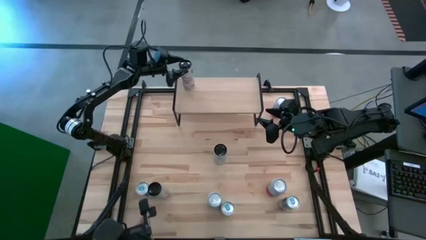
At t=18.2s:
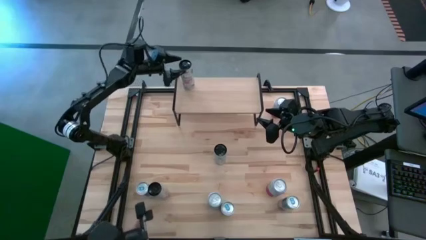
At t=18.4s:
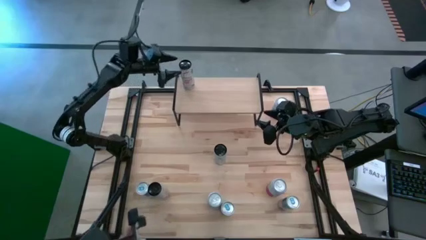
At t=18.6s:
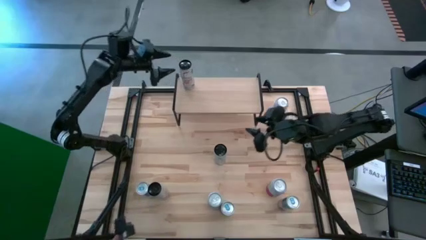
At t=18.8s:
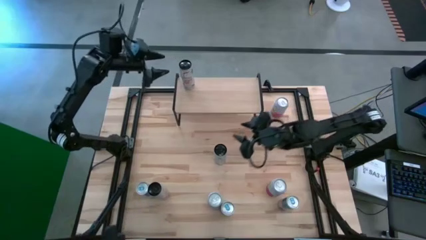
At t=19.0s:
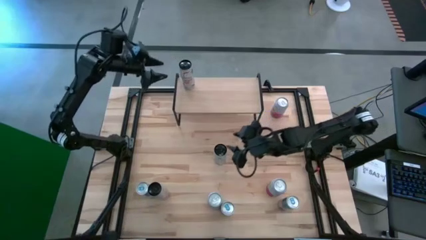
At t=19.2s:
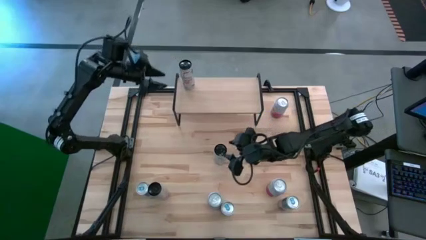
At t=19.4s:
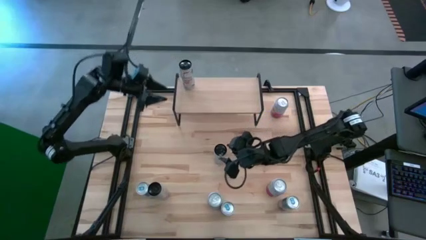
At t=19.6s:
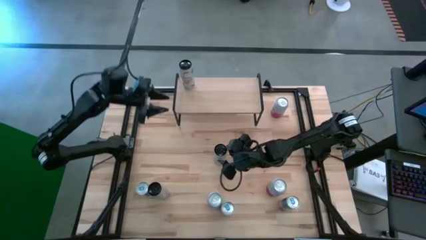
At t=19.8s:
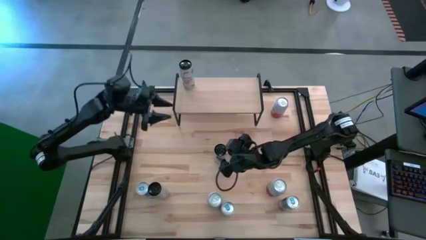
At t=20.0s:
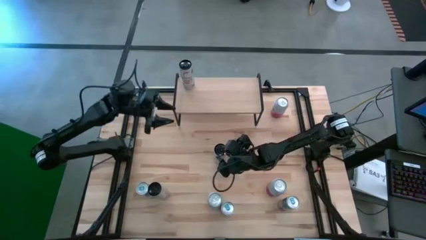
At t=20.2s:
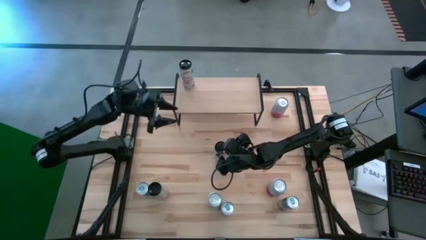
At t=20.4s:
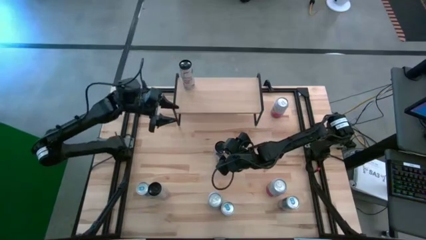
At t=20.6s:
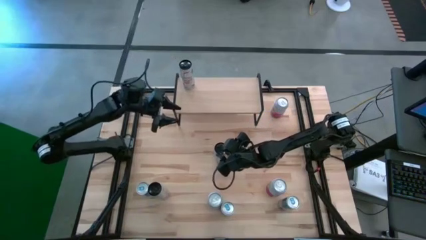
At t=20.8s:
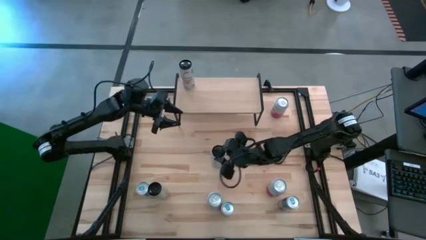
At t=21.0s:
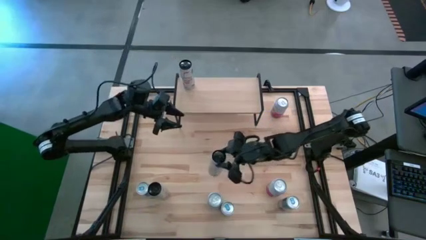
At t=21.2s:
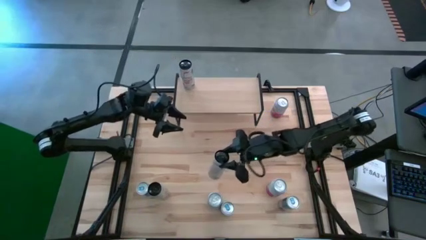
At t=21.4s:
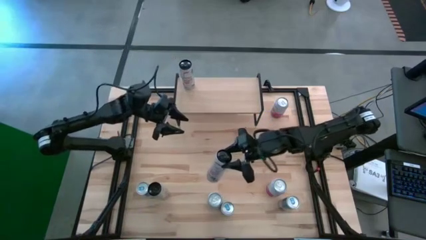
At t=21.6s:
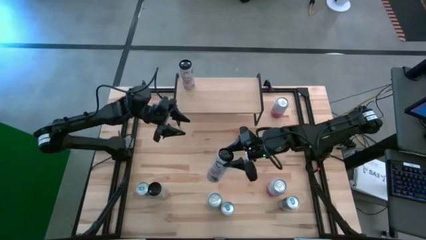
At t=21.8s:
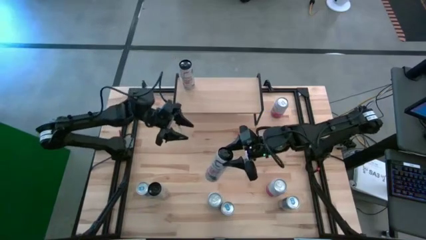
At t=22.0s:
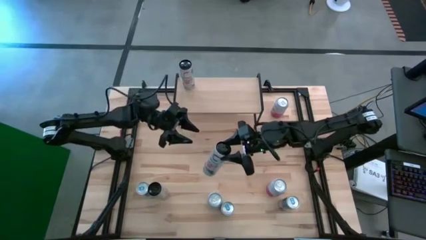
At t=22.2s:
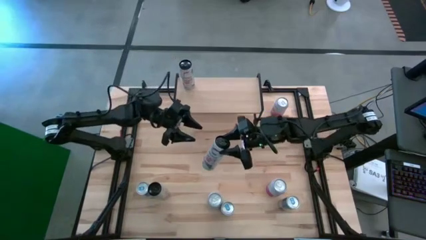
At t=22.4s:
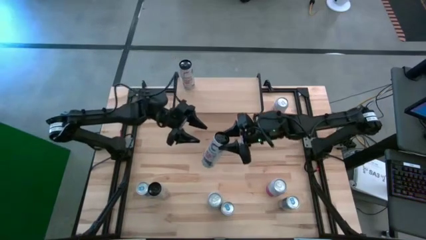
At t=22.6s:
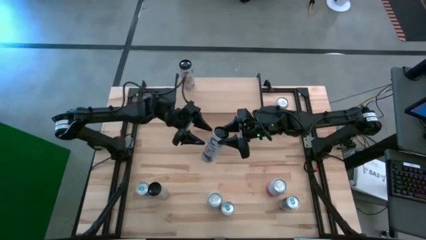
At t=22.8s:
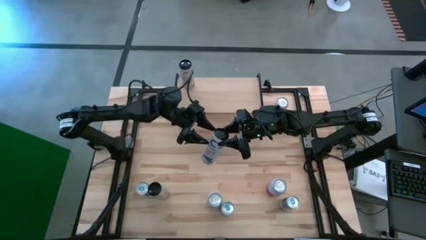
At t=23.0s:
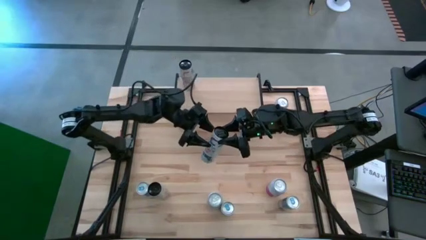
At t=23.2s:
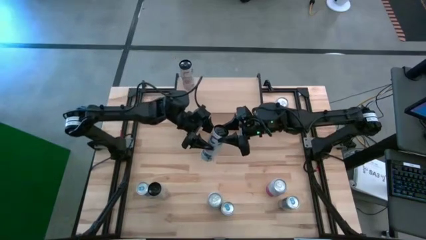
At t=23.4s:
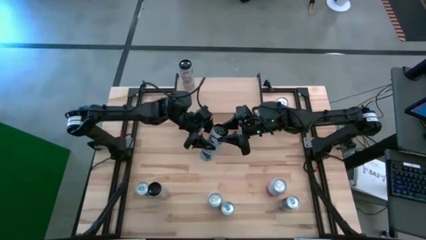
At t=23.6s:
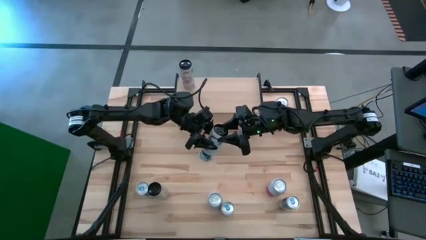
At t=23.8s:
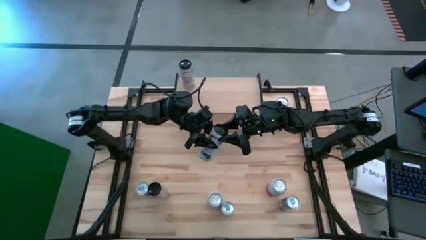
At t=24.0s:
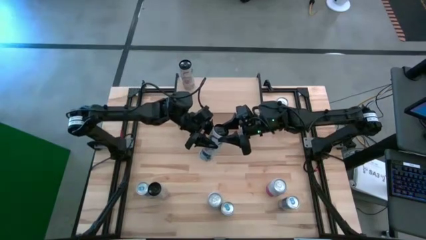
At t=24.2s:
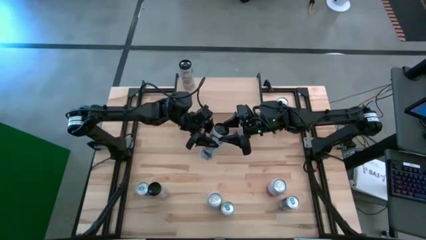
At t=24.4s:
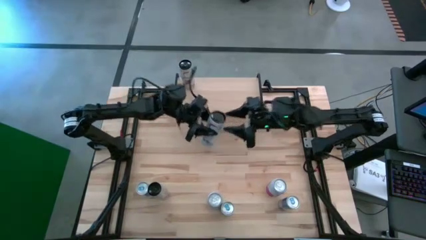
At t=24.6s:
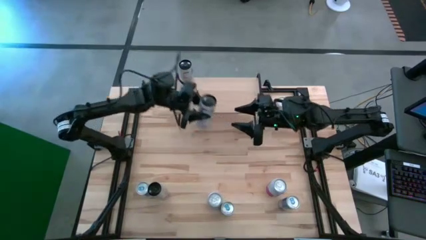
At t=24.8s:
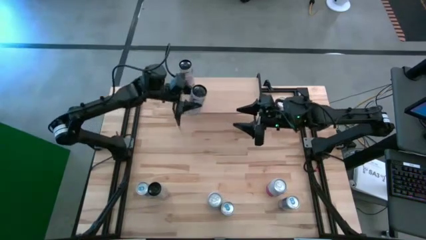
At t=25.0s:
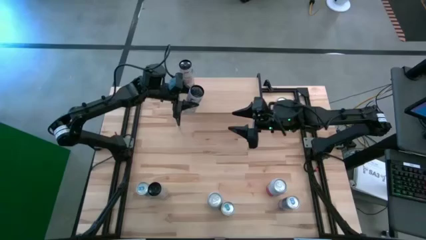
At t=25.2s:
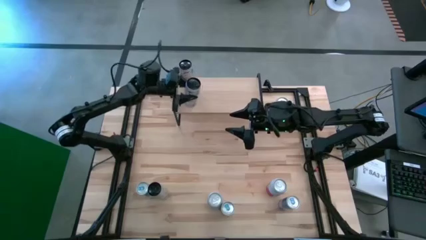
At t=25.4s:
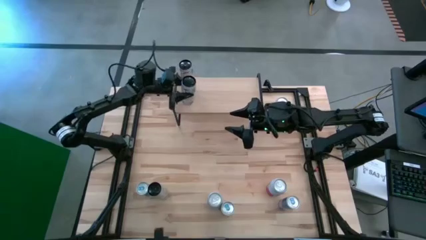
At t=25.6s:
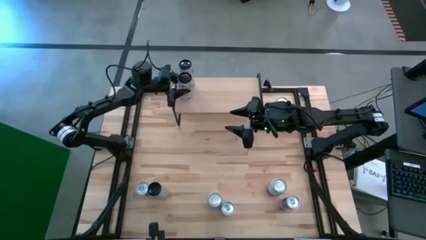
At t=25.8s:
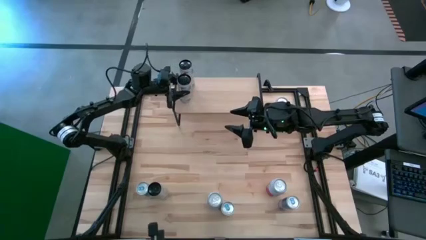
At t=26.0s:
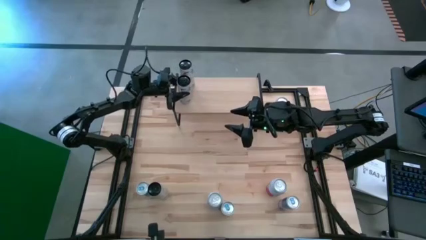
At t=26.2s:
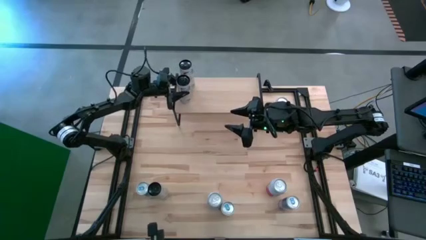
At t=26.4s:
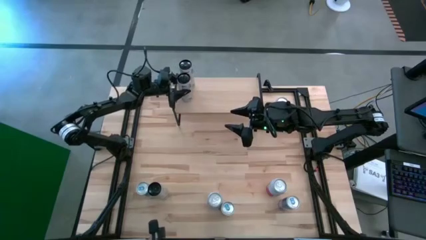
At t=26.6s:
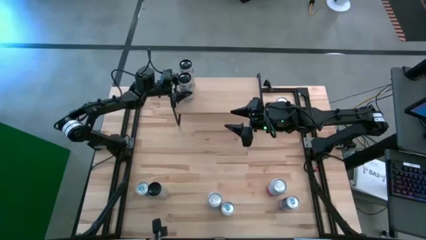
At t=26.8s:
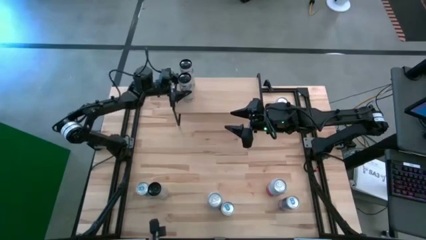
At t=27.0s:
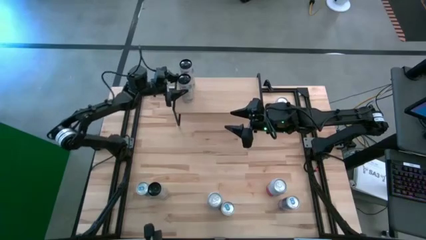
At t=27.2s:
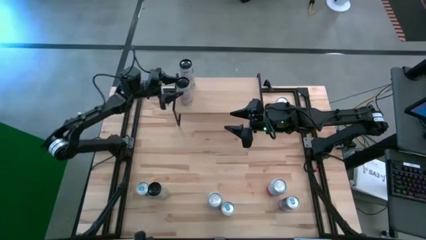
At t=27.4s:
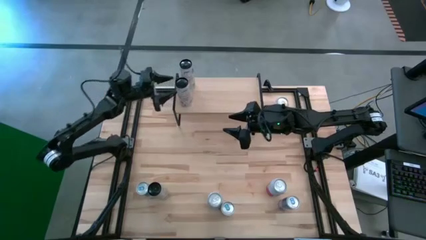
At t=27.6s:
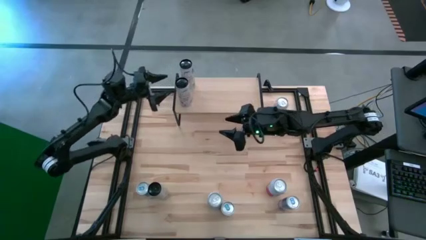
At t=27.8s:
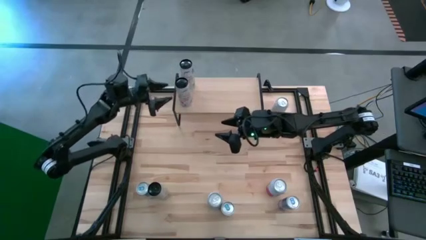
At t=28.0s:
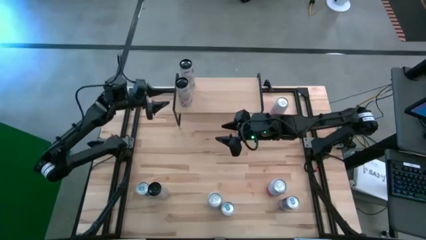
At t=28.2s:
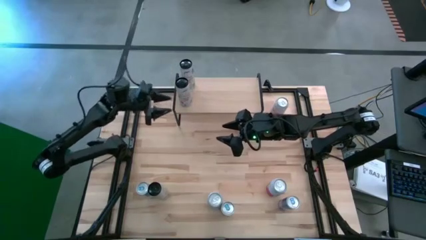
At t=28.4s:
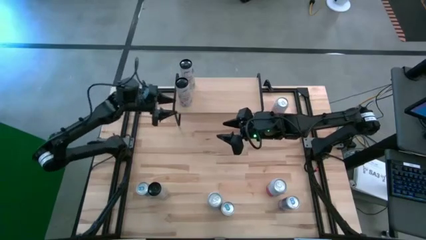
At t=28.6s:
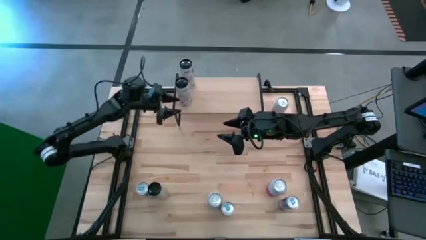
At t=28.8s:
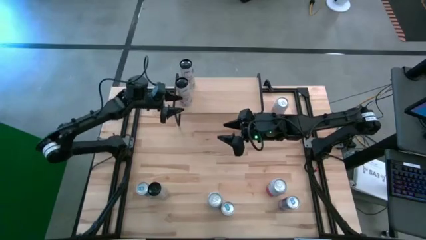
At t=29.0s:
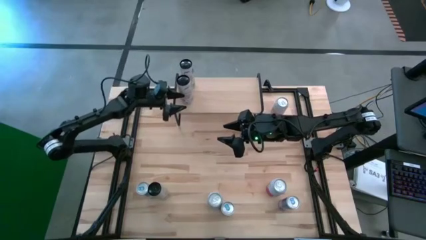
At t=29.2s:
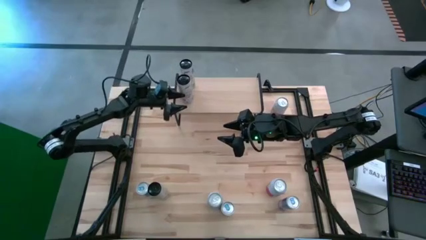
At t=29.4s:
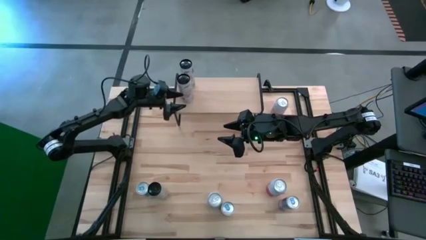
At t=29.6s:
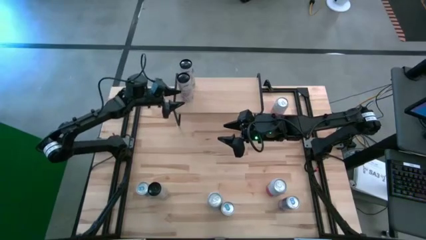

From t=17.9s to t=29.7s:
Task: Place canned beverage on shelf
Put the top white-pink soda can on the shelf aligned with the other white-pink soda can
